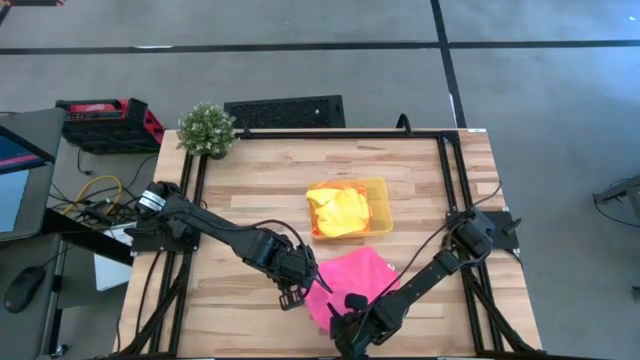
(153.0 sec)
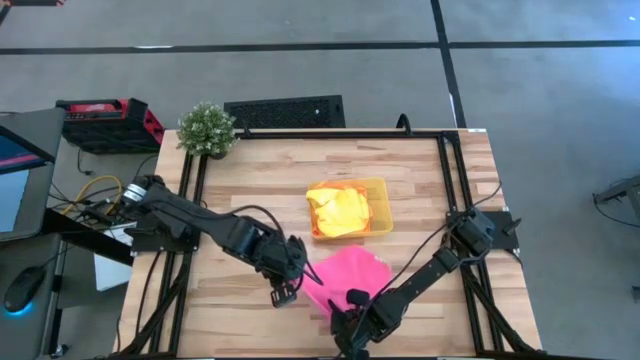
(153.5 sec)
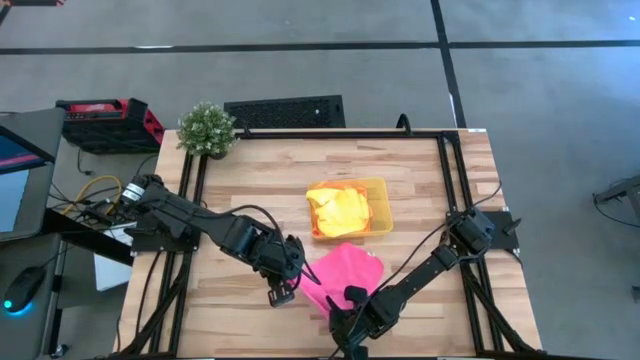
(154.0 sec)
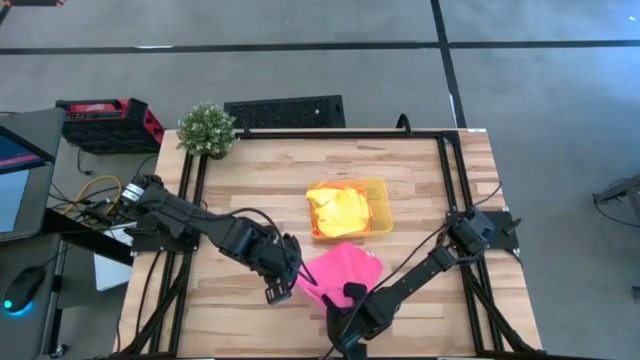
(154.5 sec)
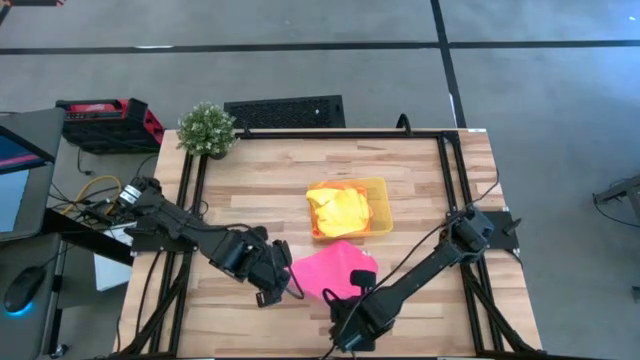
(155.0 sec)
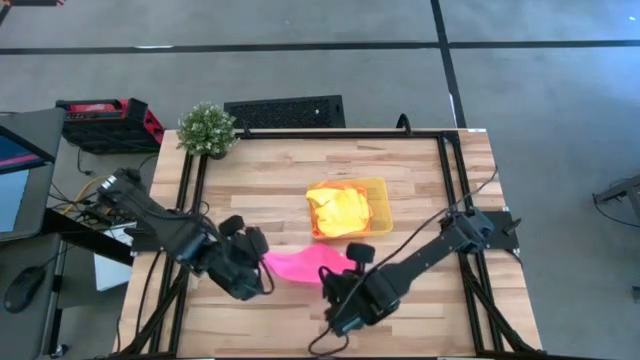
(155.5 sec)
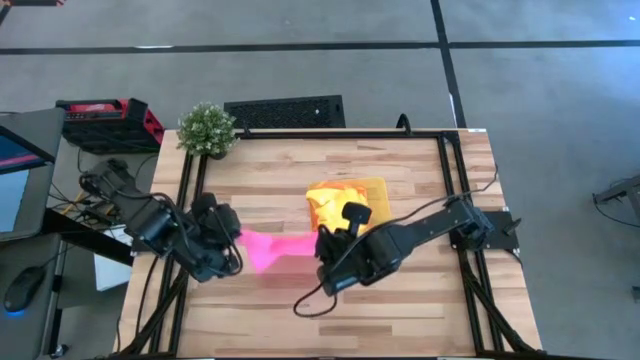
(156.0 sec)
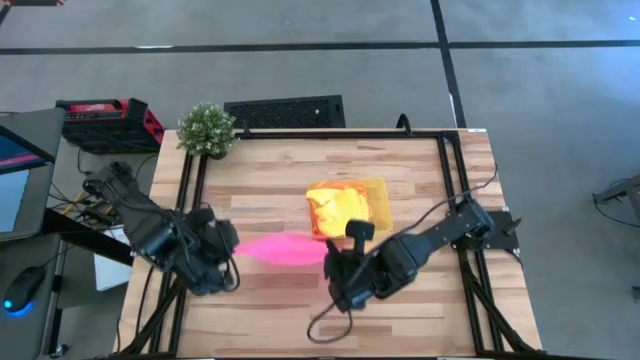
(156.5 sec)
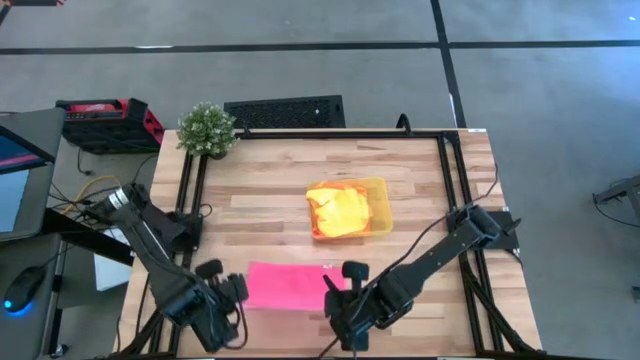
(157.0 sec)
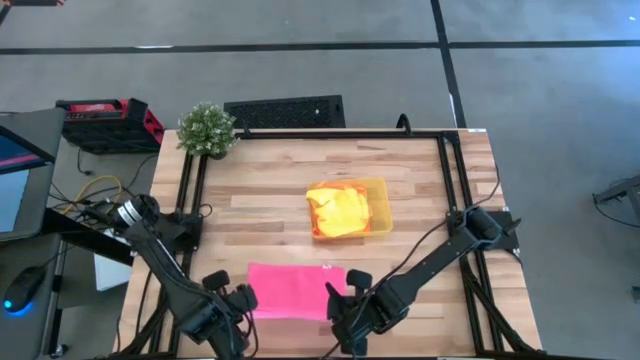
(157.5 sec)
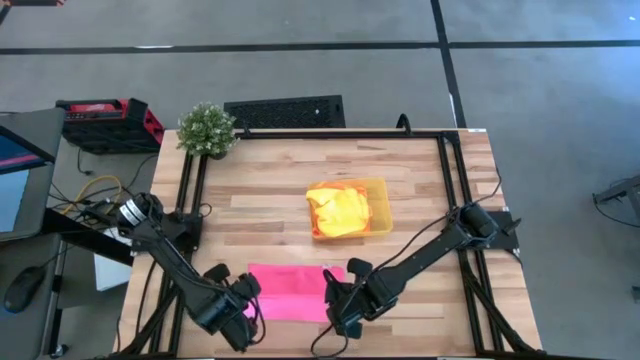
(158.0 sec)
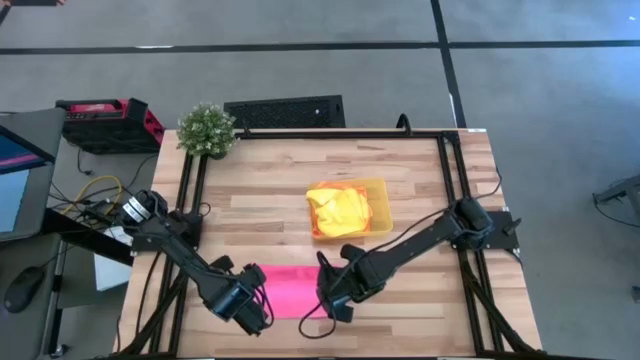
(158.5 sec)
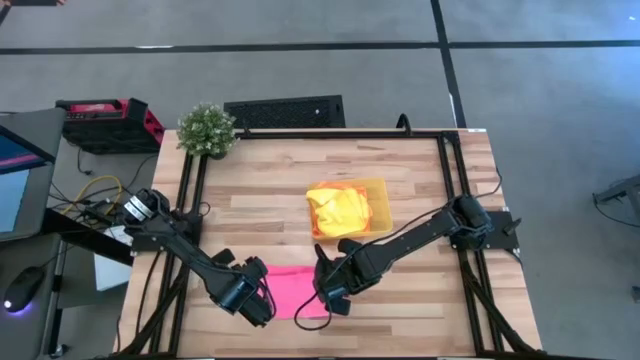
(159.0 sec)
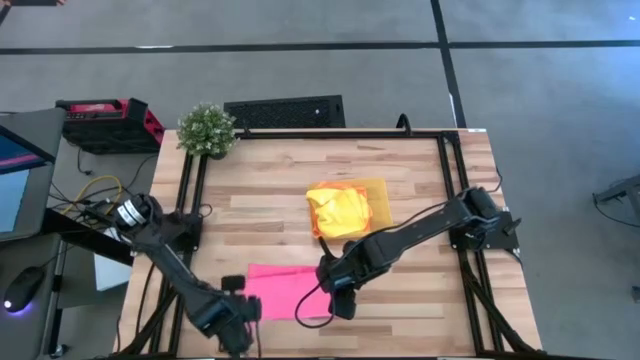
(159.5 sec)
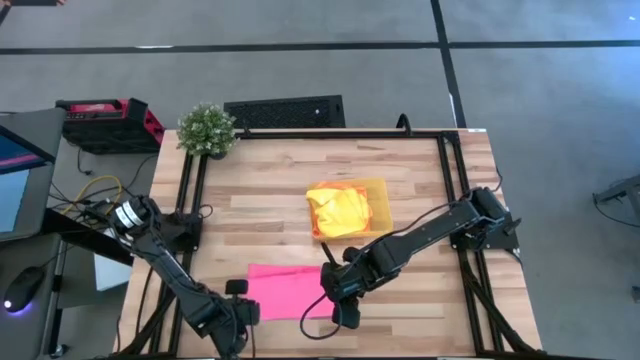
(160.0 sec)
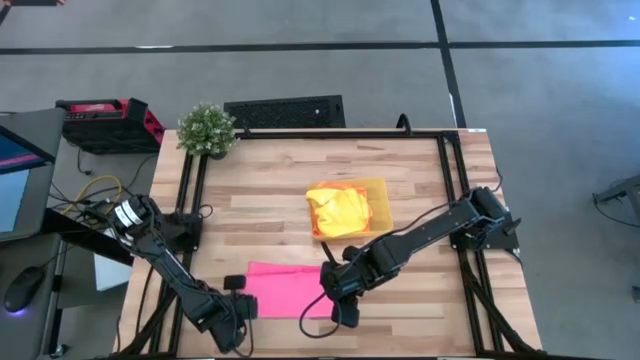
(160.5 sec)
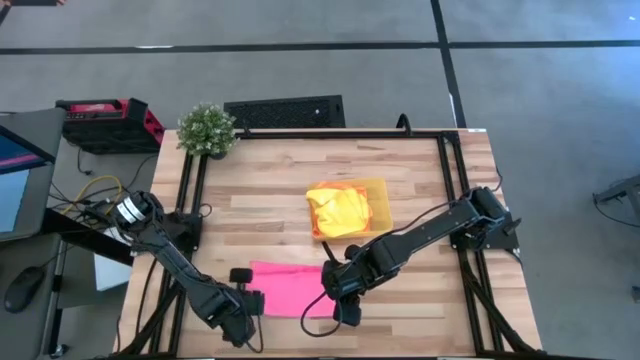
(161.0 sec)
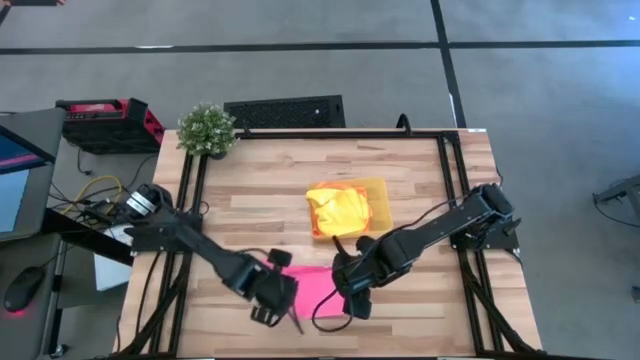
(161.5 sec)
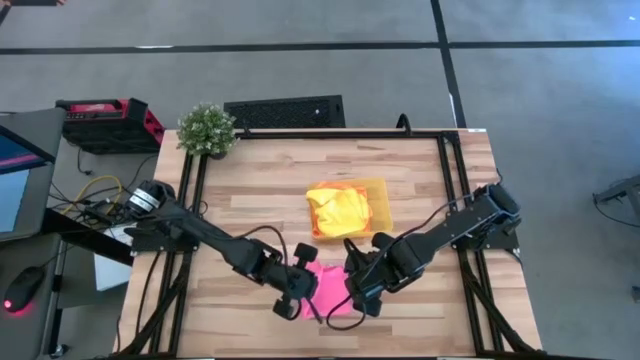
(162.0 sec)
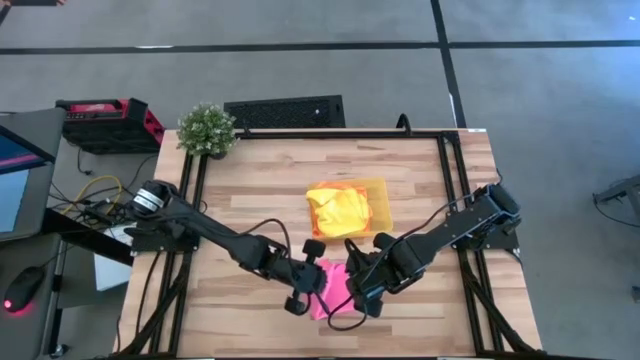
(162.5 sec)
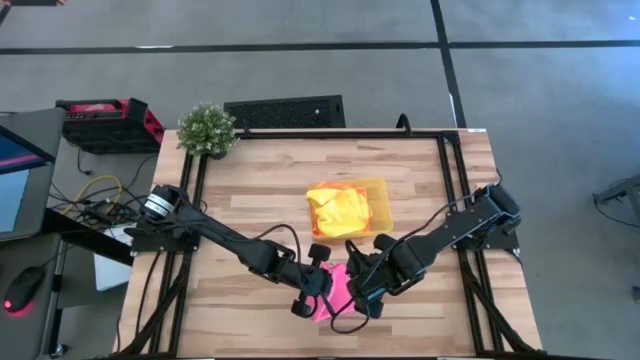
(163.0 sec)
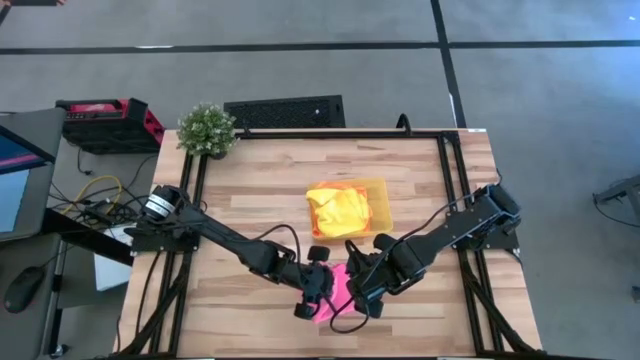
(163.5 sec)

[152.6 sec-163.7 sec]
Task: Fold microfiber towels
Fold the pink microfiber towel

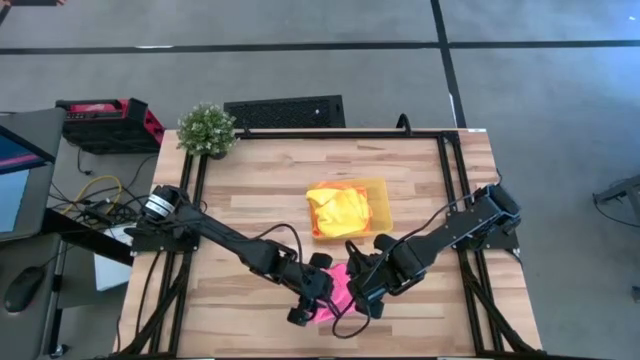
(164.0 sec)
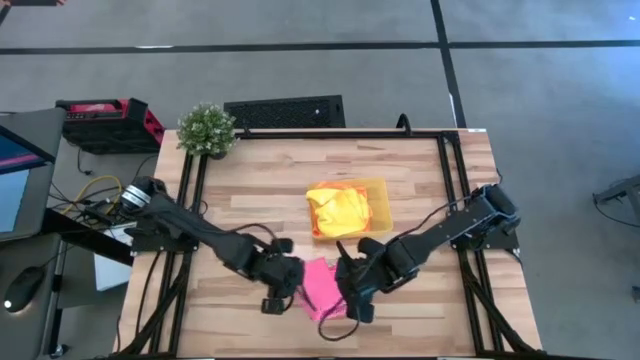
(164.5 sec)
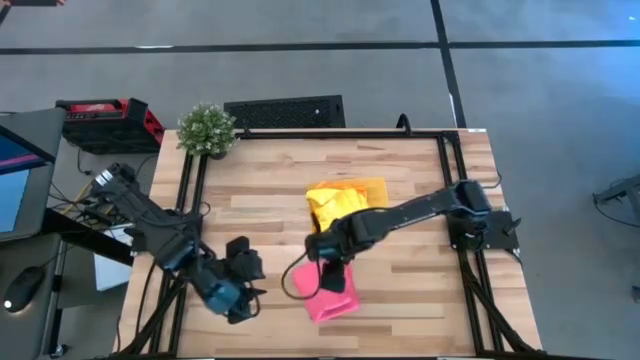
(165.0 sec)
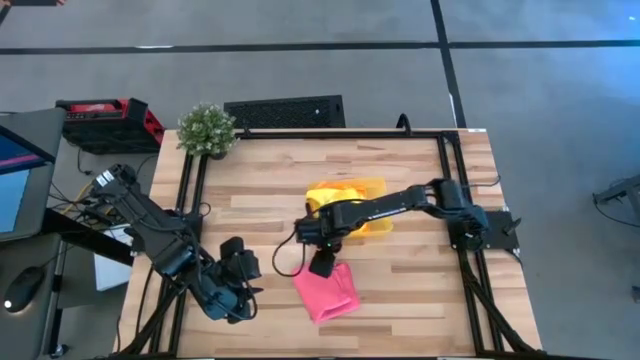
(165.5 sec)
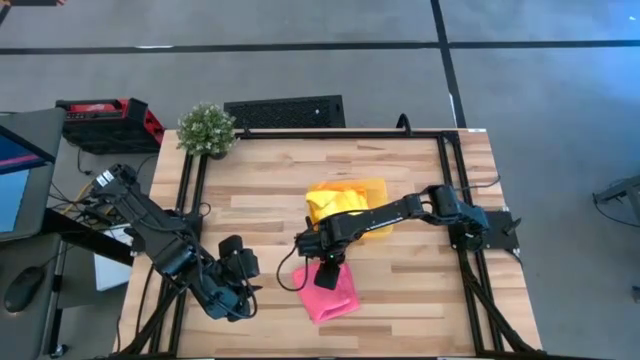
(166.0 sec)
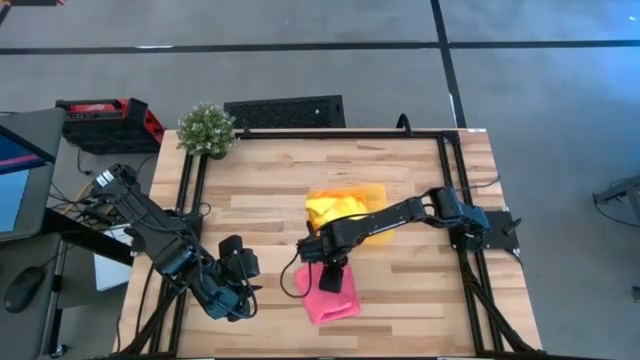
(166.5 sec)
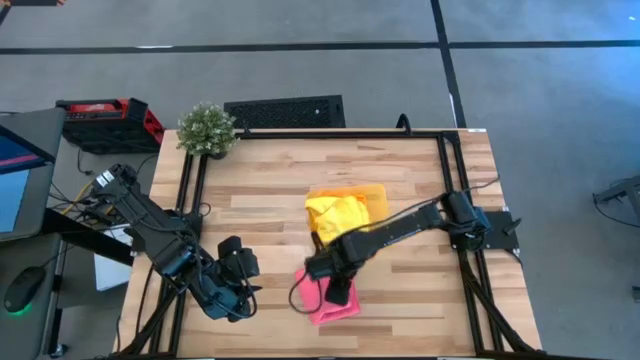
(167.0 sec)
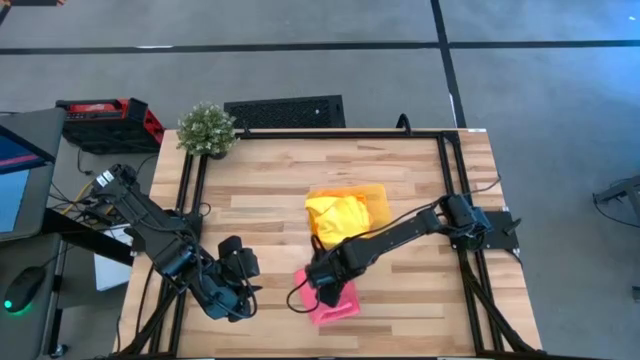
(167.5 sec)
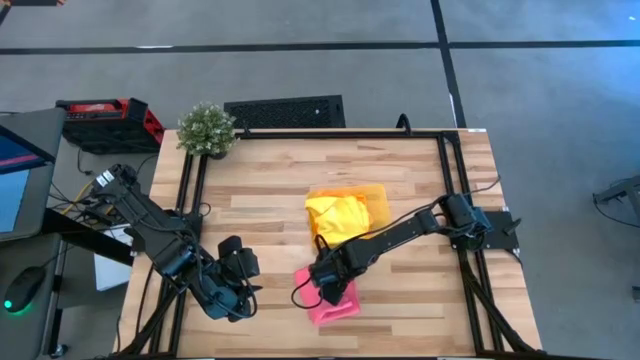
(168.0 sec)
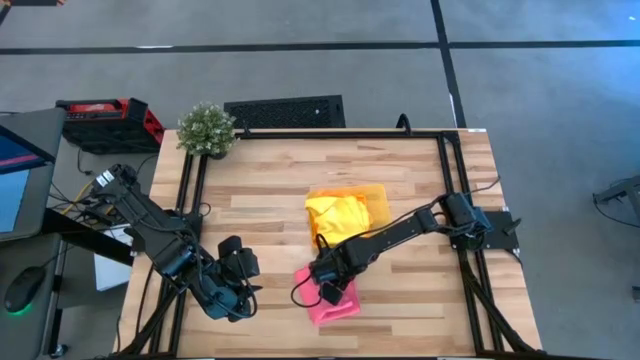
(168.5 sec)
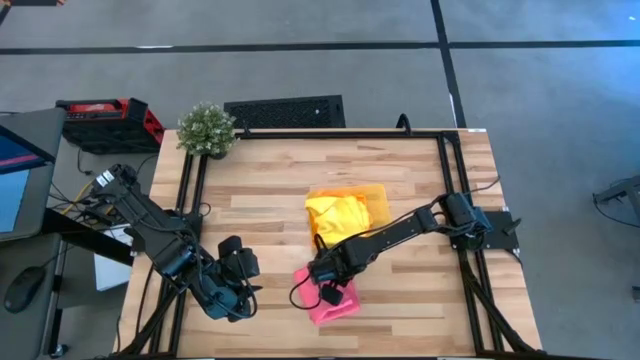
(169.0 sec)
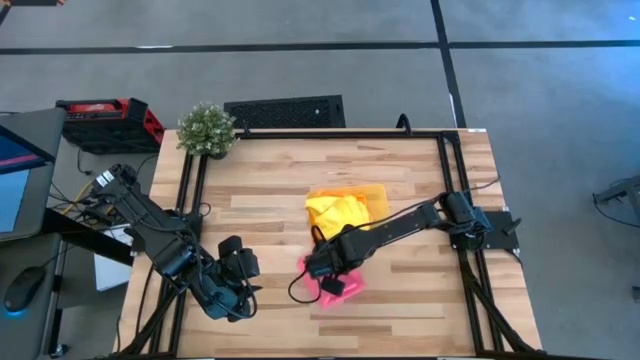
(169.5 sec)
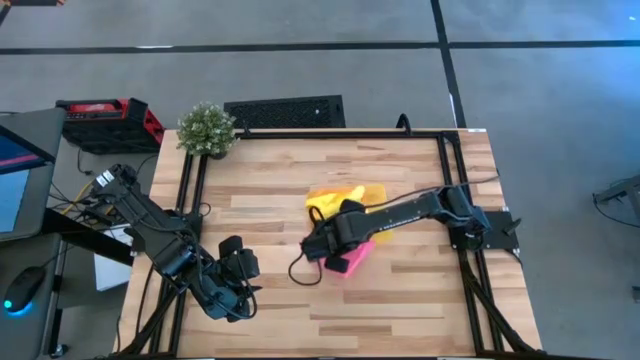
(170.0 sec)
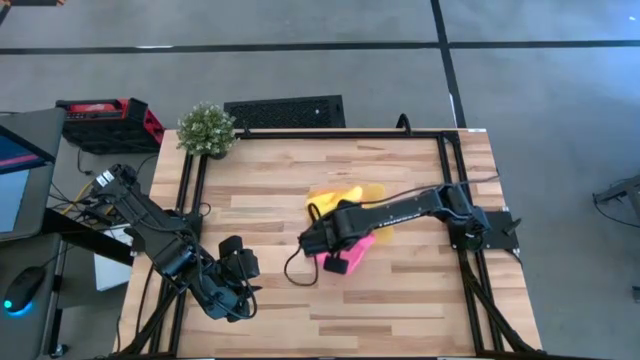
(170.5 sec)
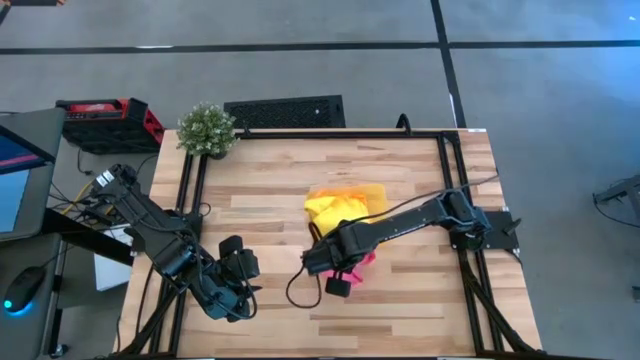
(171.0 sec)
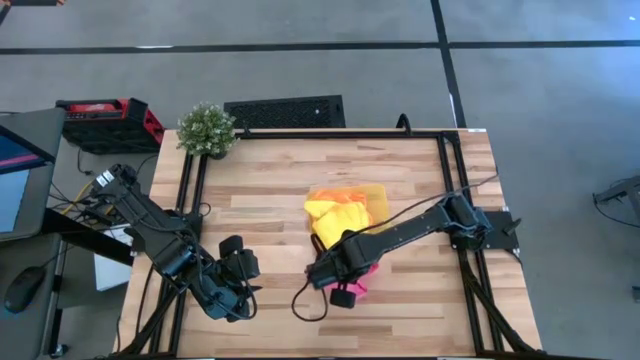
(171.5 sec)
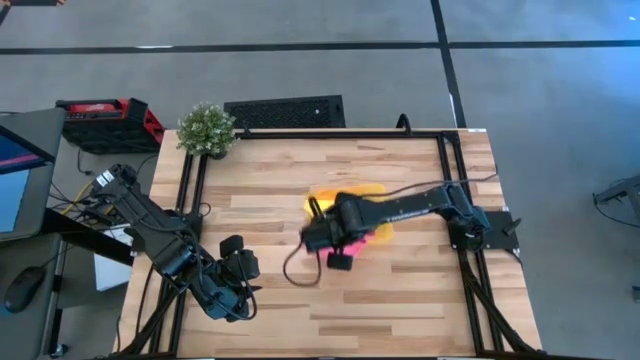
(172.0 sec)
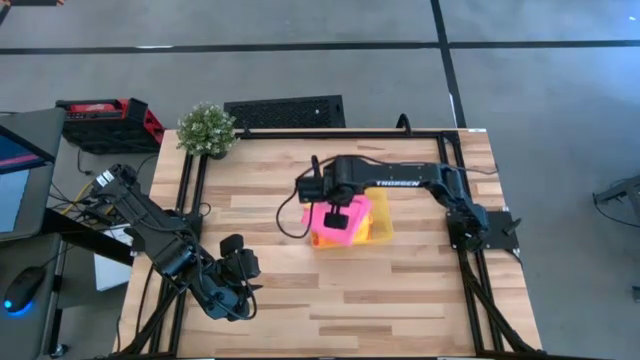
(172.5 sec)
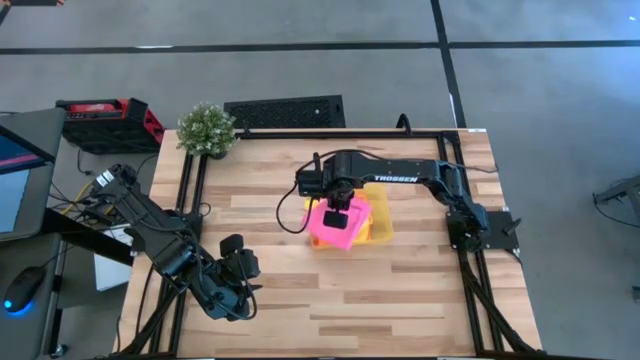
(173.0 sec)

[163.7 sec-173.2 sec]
Put the folded pink microfiber towel into the yellow bin

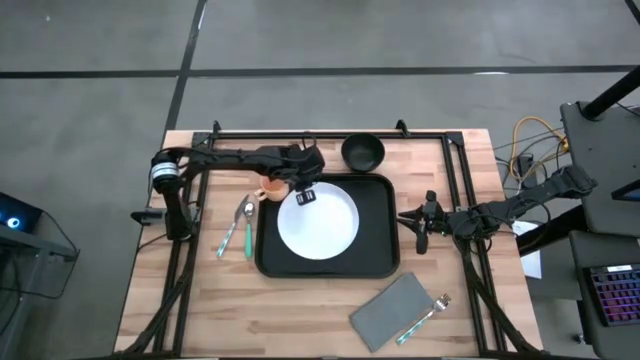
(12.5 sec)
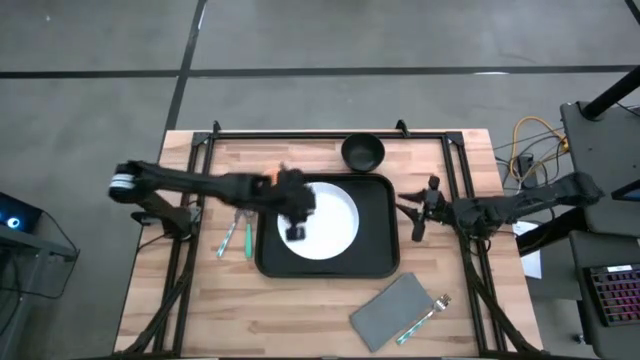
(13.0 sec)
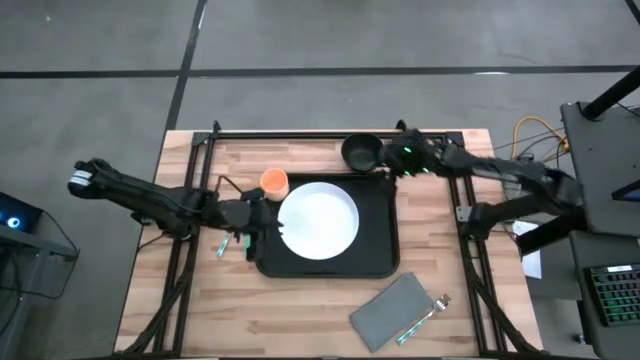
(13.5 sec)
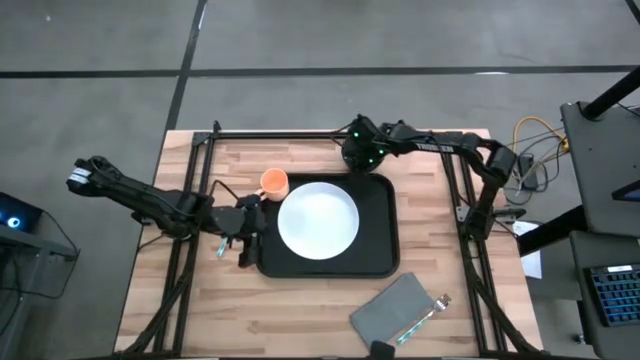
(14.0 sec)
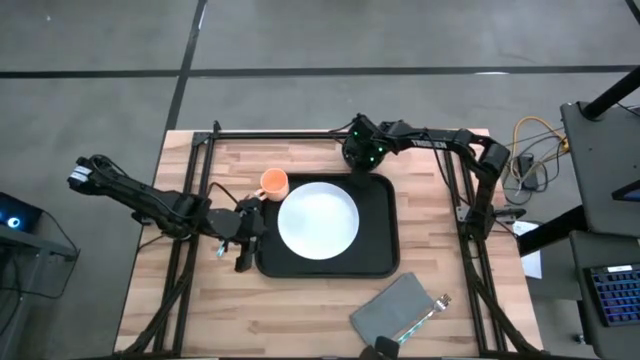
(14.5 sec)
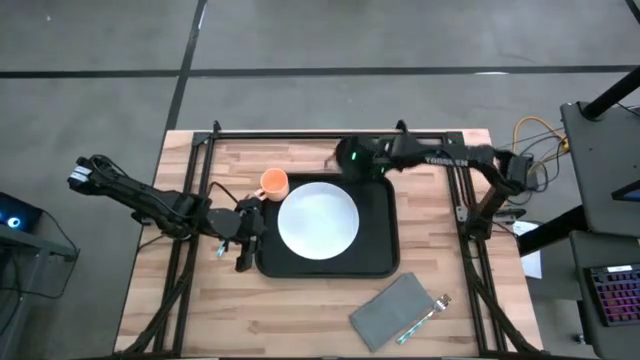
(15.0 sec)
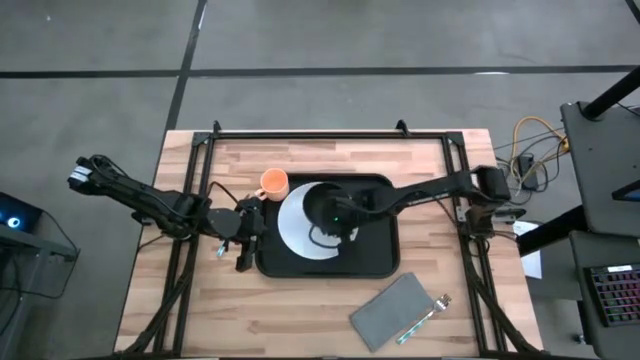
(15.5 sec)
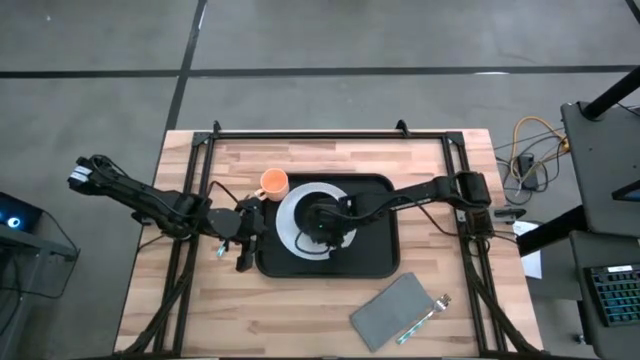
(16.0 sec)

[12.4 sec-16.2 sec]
Task: Set up tray
Put the black bowl on top of the white plate
